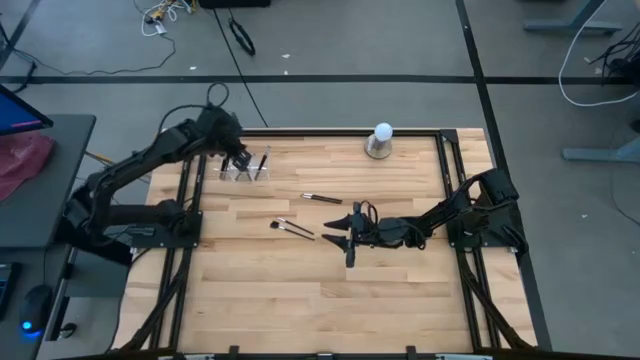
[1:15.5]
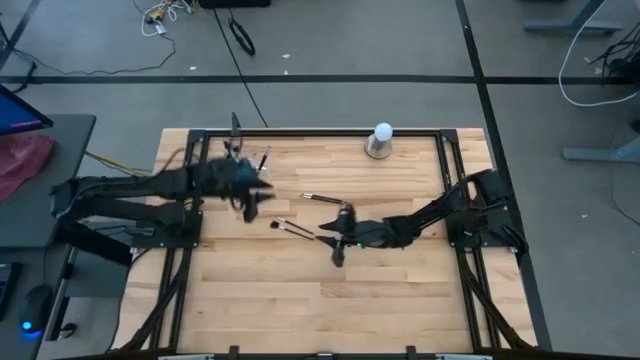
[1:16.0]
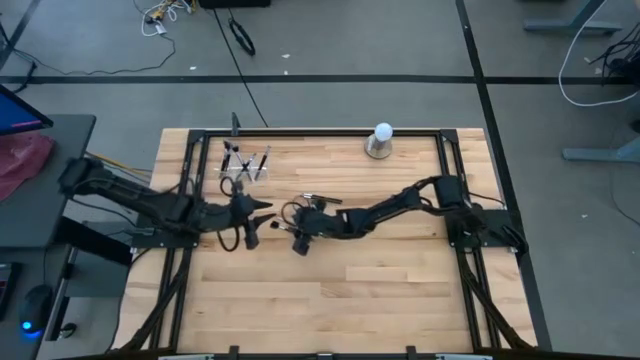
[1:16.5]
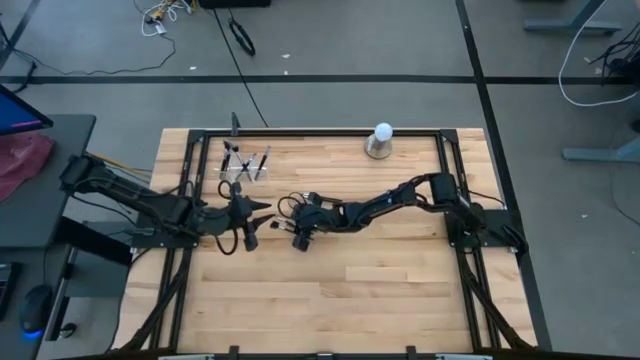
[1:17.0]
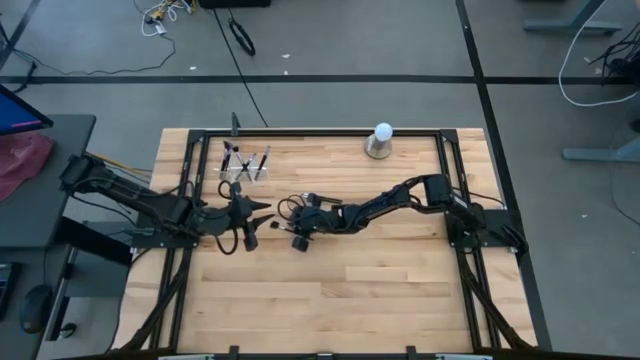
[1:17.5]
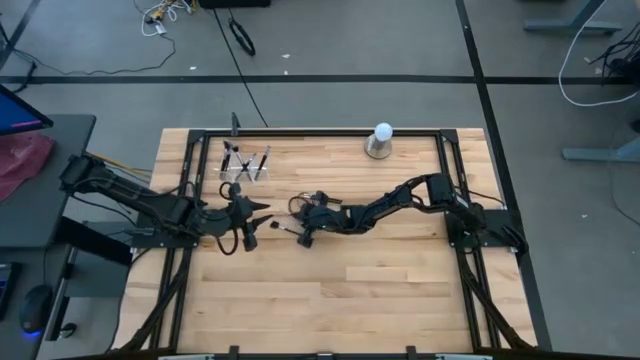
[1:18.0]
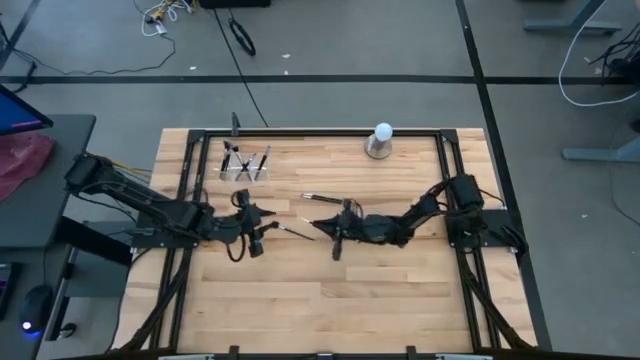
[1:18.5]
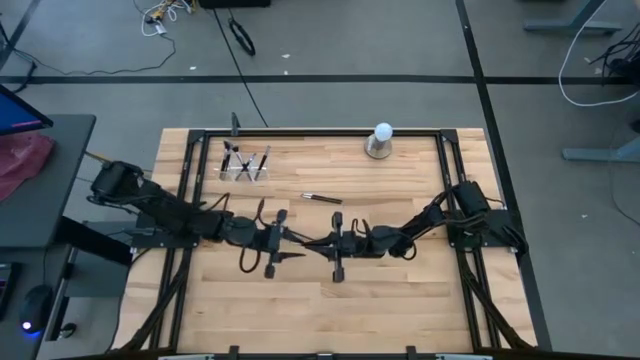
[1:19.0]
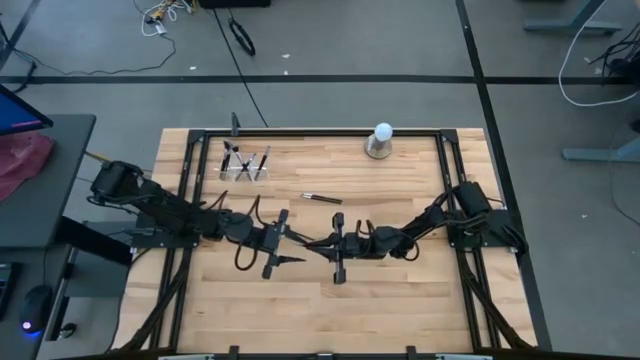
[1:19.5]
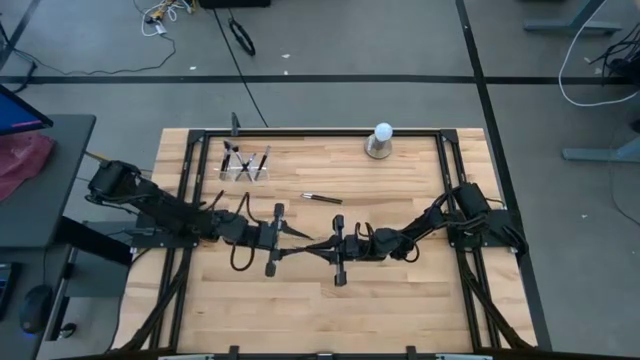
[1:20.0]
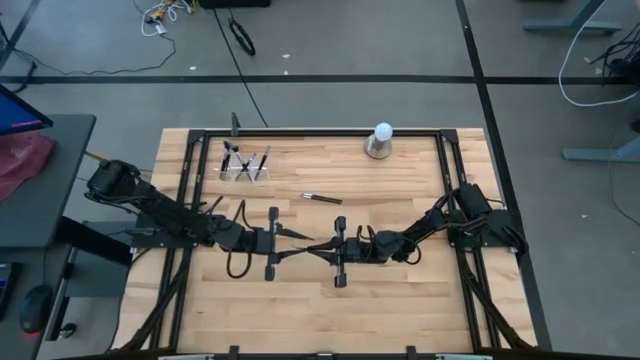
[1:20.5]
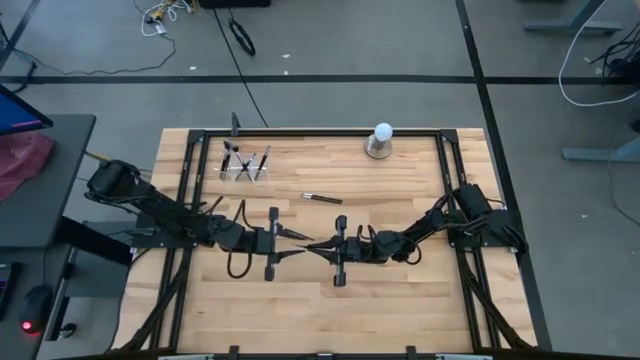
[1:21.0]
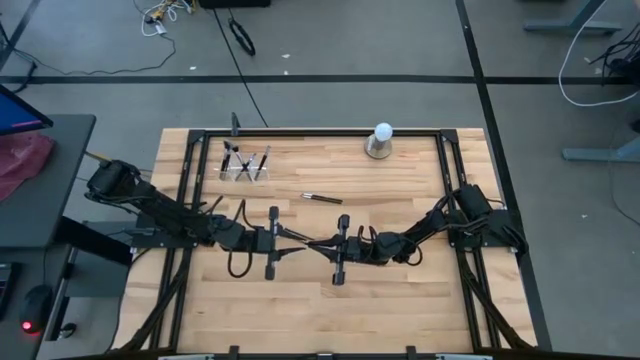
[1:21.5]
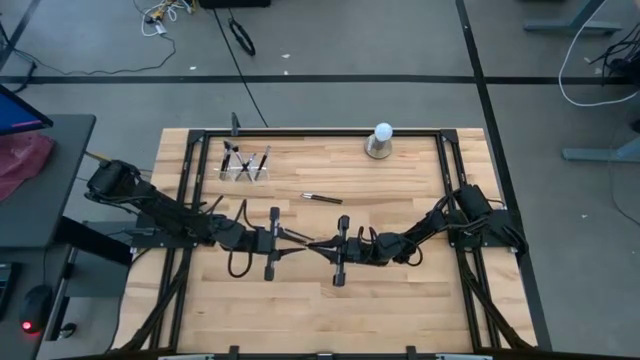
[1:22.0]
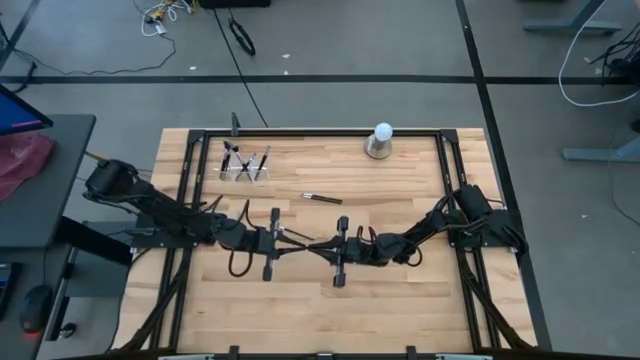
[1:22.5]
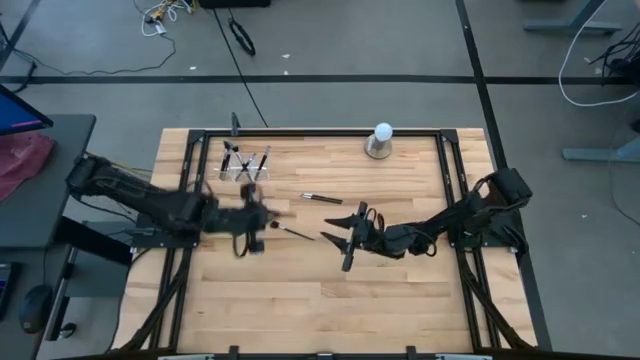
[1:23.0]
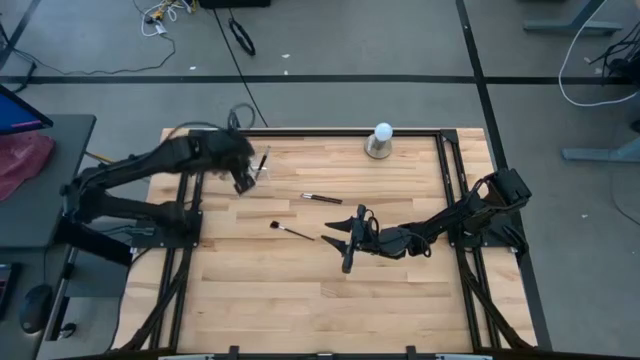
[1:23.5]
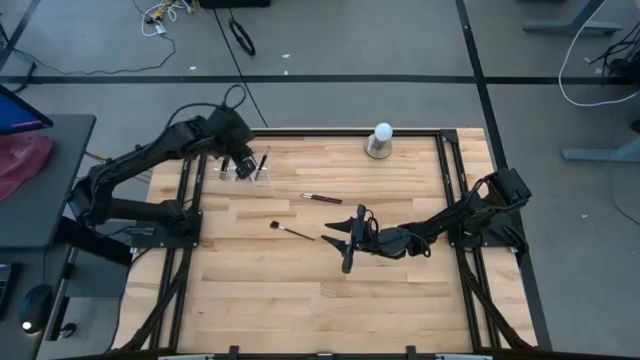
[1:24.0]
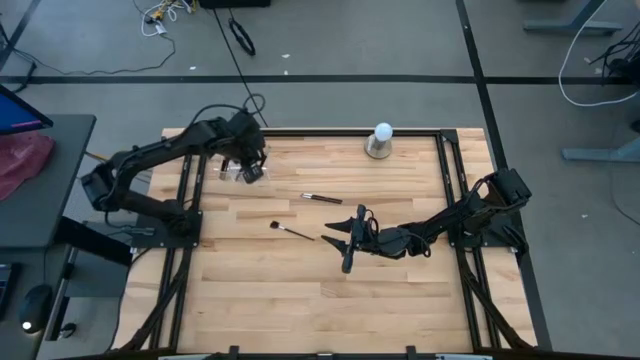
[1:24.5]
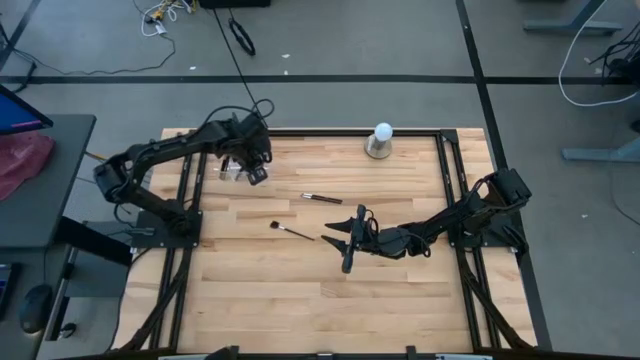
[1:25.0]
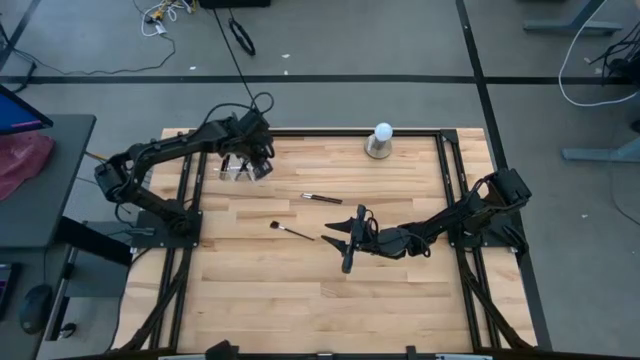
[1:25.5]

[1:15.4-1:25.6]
Task: Put items in baskets/containers
Put the liner brush into the transparent organizer

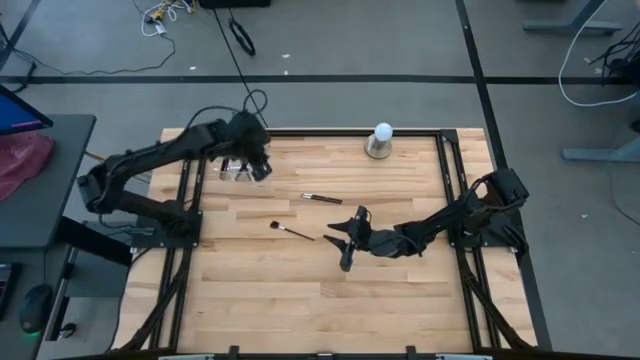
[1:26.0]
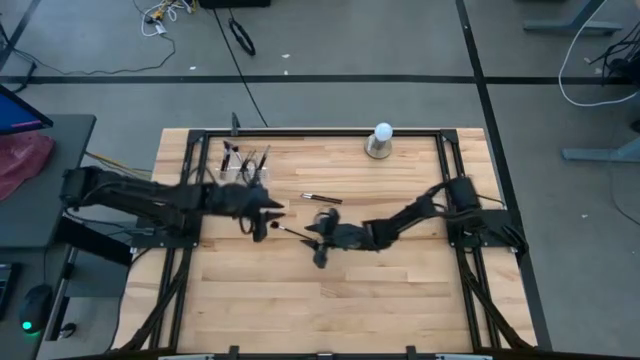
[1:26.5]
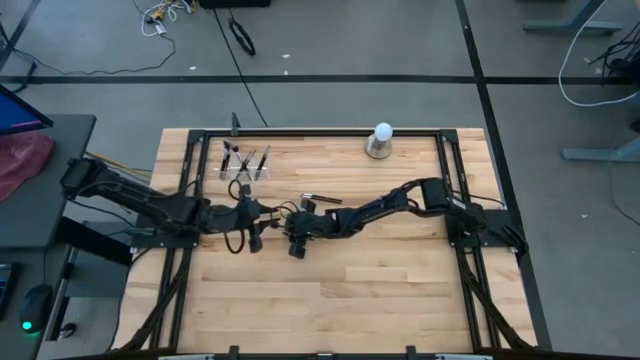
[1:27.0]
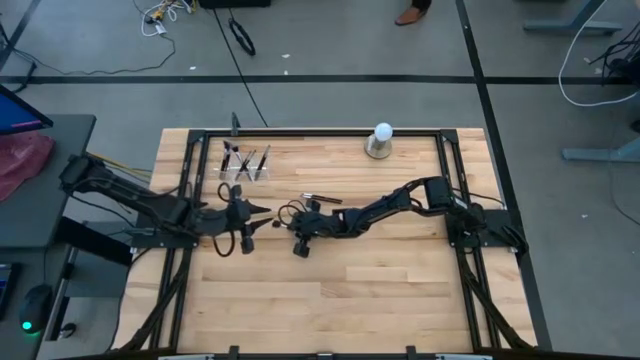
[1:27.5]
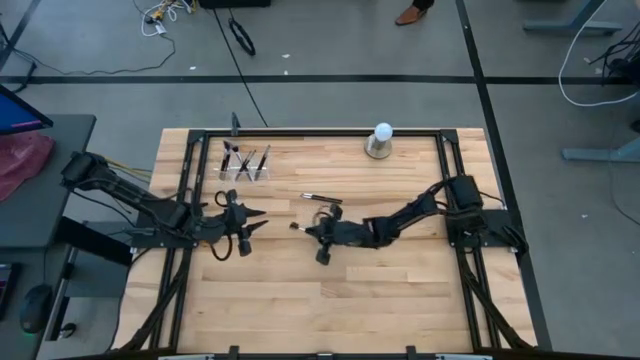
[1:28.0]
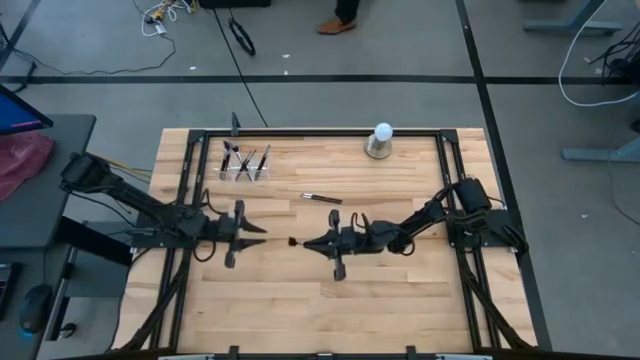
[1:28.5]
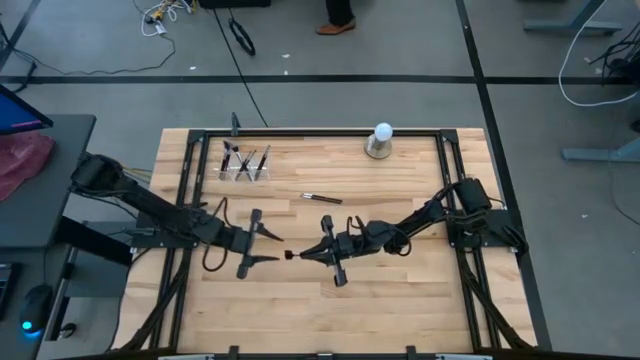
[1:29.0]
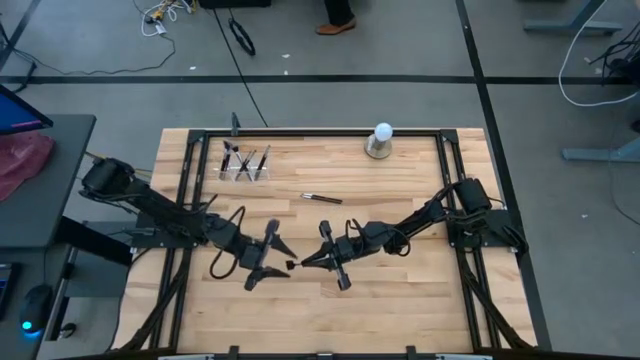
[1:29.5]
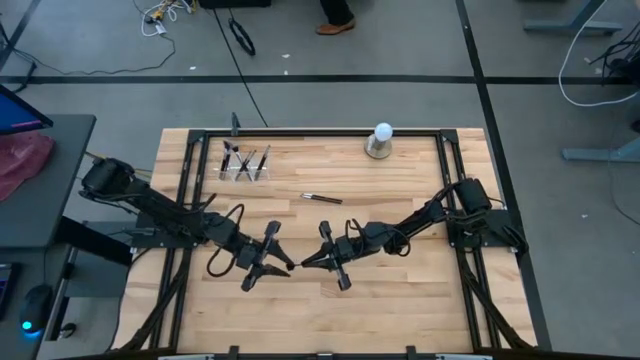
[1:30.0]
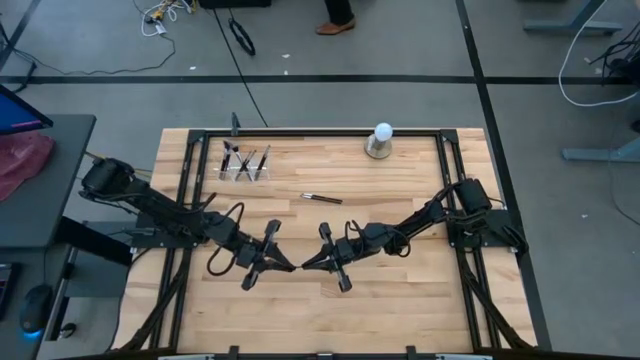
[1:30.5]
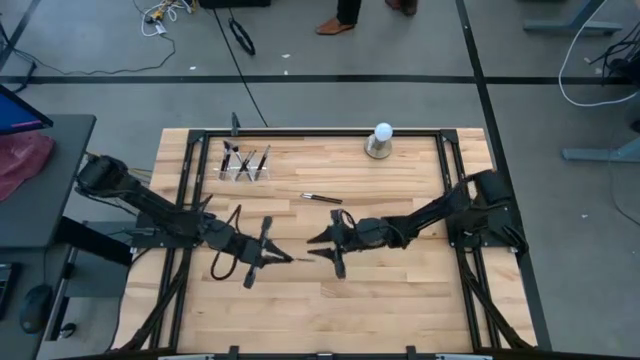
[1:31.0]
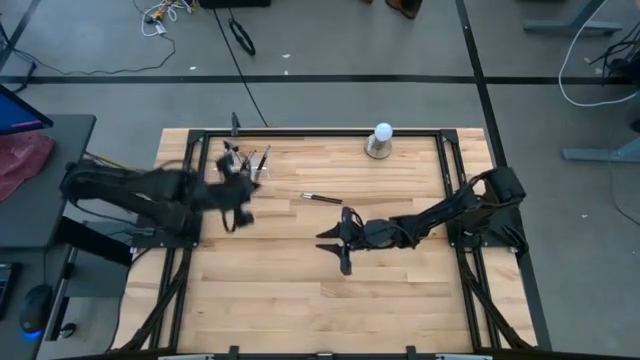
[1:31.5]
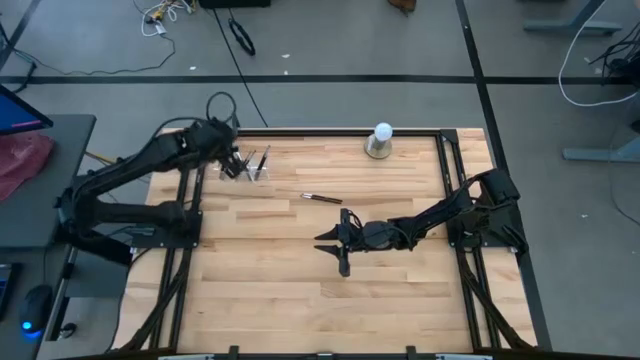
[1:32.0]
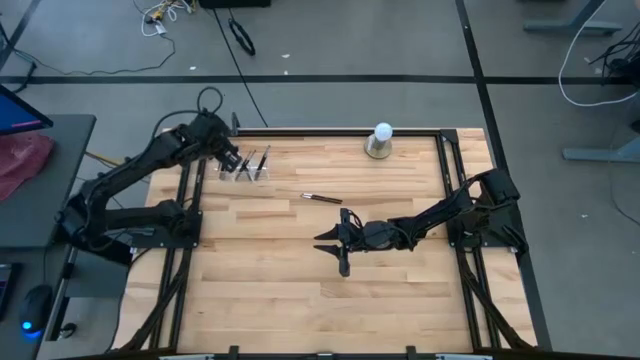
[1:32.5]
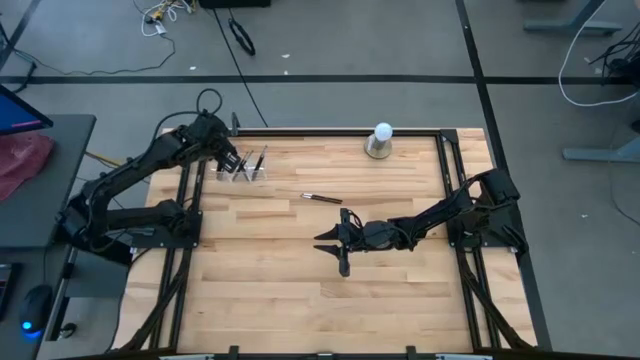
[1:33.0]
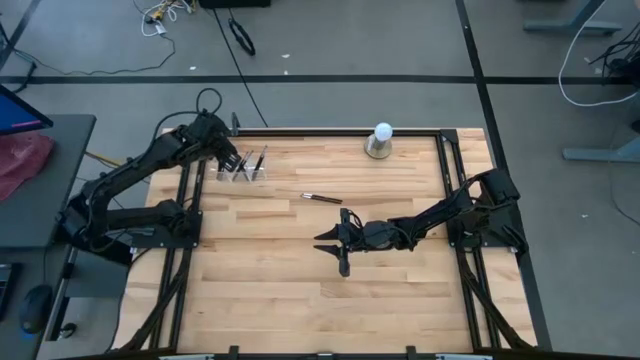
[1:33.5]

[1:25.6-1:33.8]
Put the eyebrow brush into the transparent organizer
